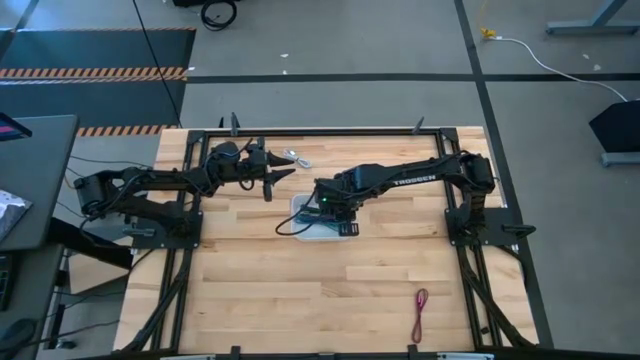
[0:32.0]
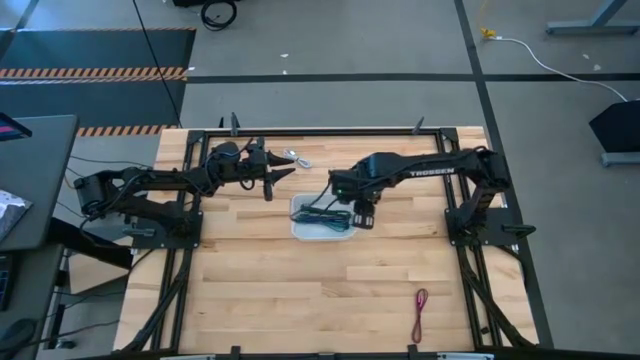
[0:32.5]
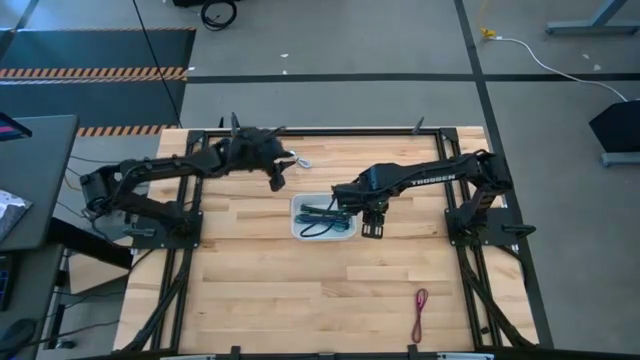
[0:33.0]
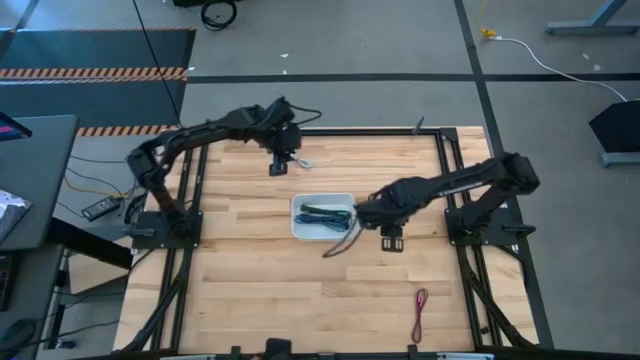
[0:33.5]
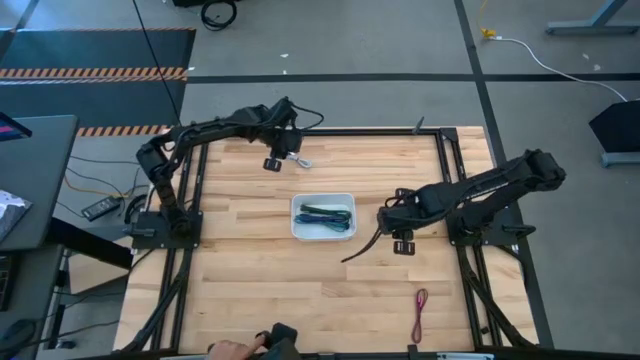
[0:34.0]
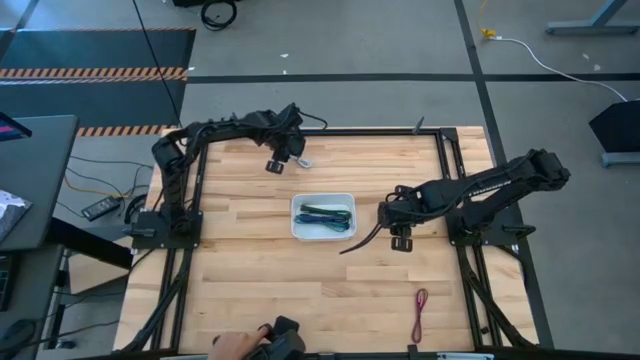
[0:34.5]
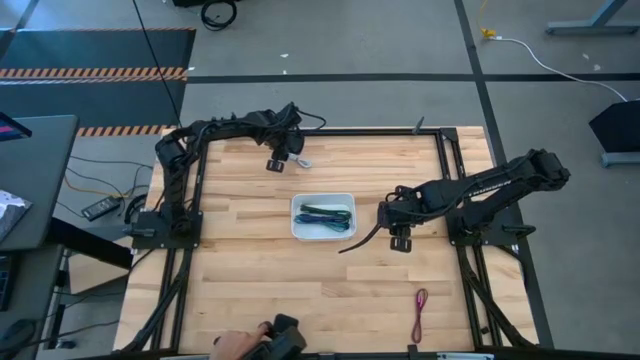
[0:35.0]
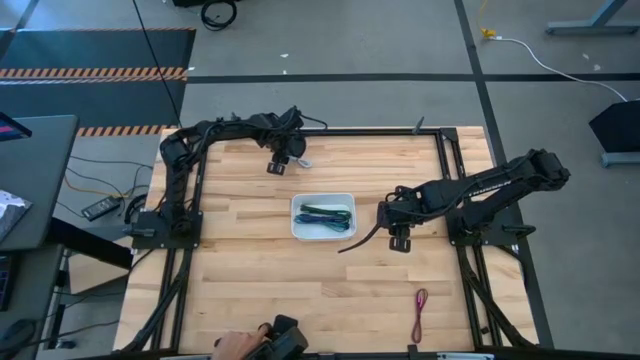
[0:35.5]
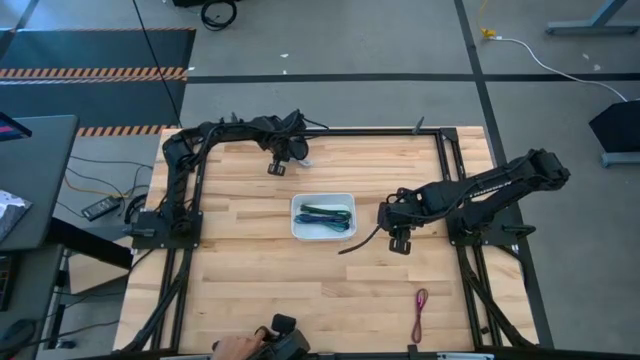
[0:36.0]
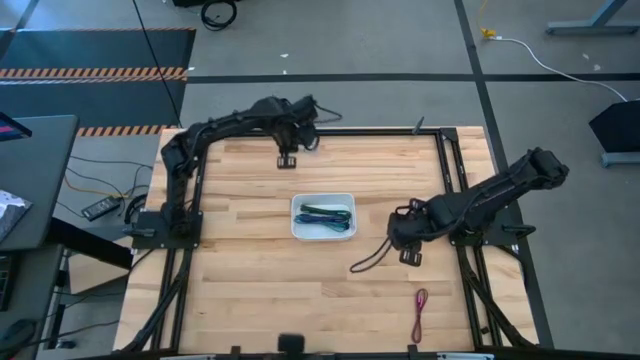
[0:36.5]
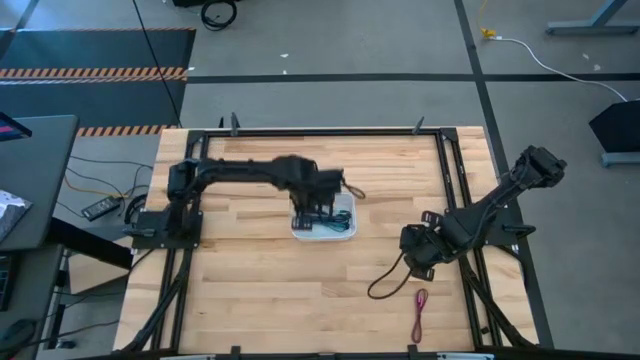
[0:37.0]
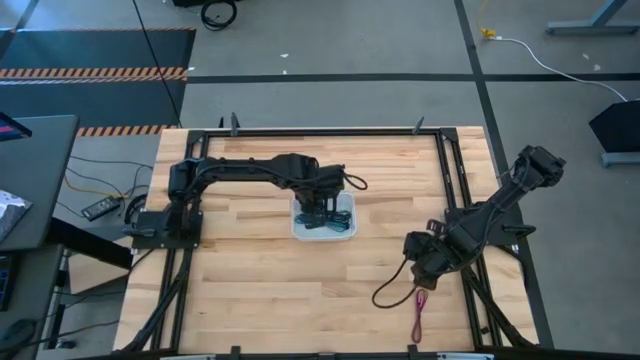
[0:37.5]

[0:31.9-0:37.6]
Task: Pick and place USB-C Cables
Put the white charger cable into the white bin

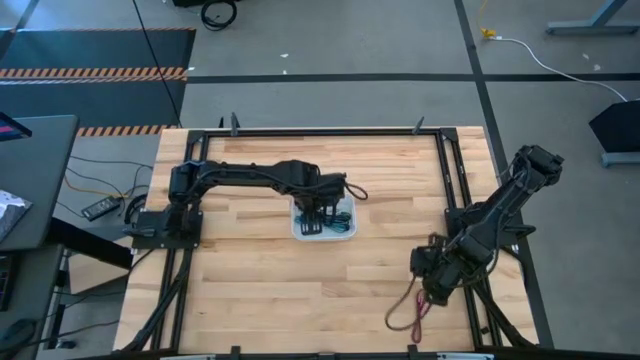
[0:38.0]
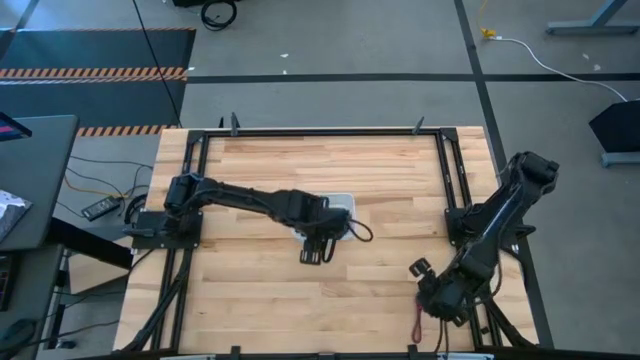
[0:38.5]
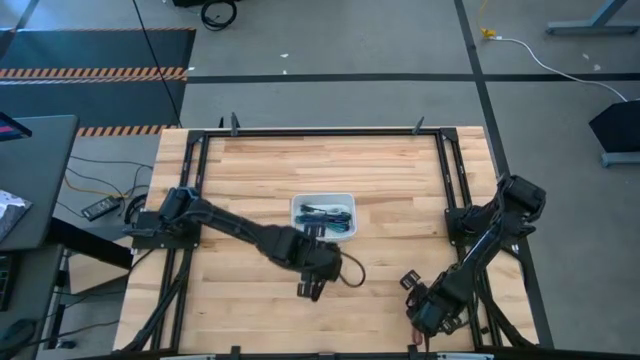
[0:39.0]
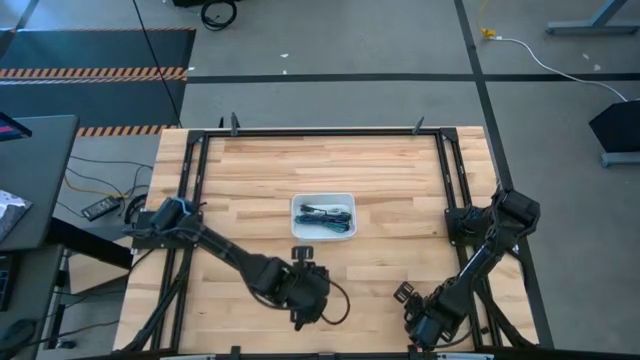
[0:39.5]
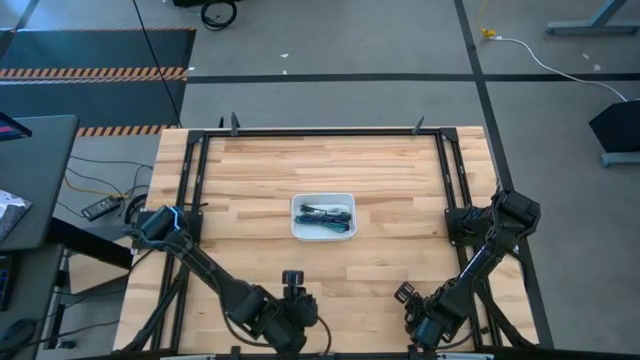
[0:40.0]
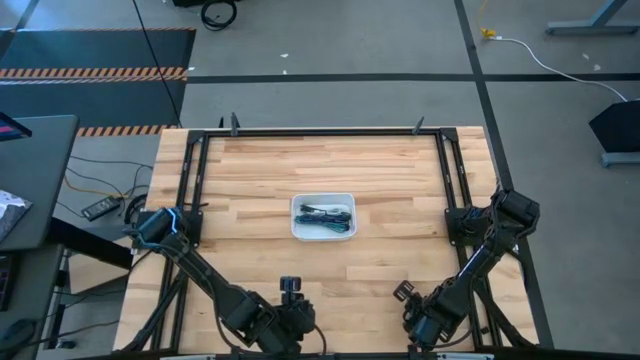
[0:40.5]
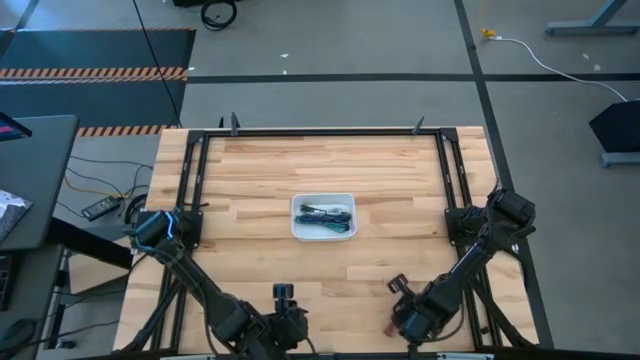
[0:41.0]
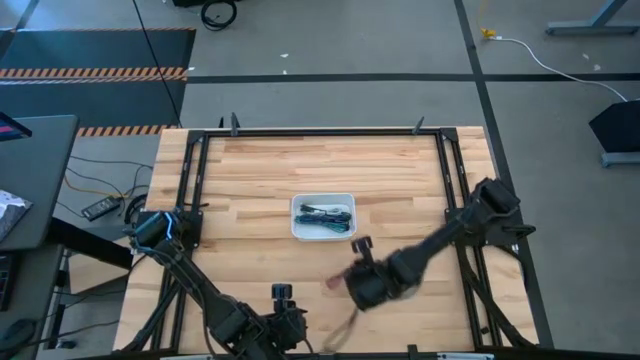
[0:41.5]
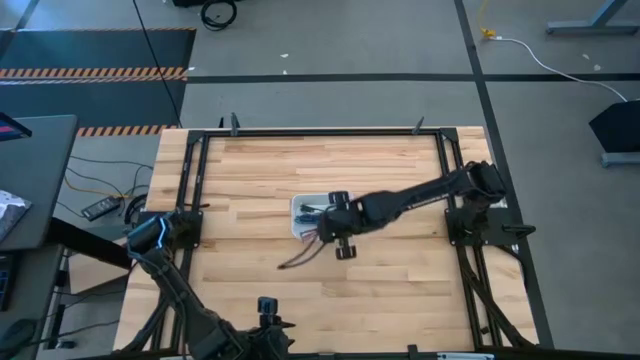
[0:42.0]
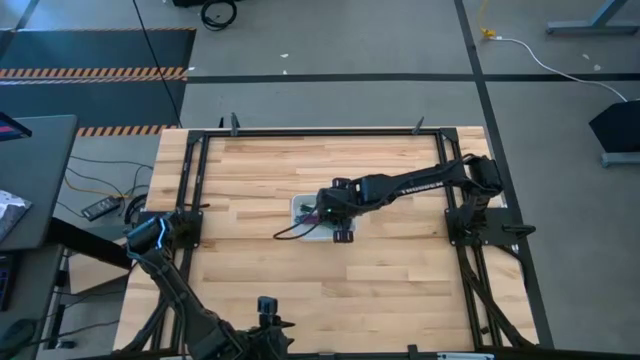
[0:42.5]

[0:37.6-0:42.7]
Put the pink charger cable into the white bin

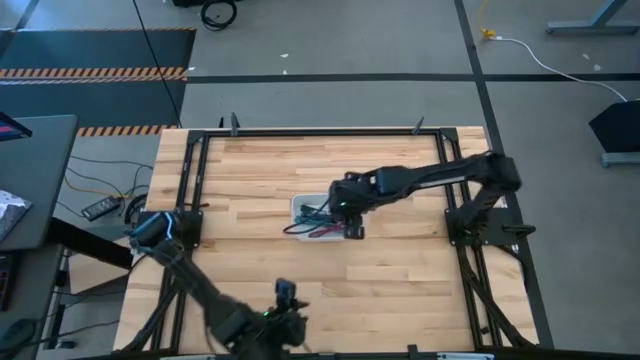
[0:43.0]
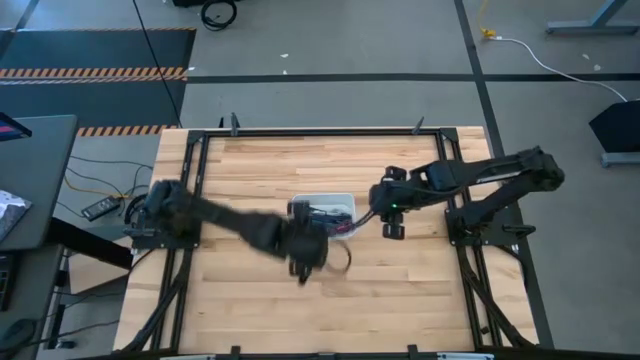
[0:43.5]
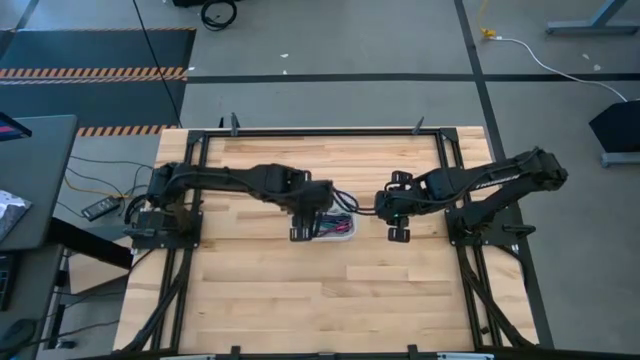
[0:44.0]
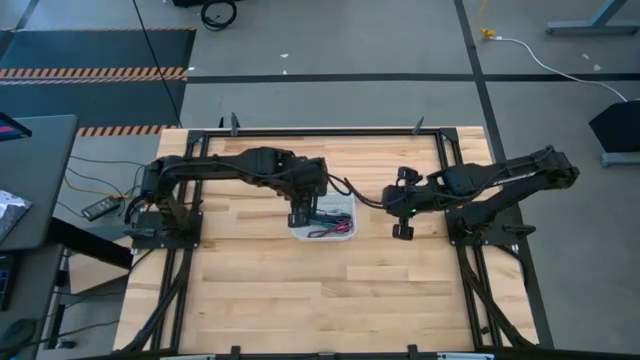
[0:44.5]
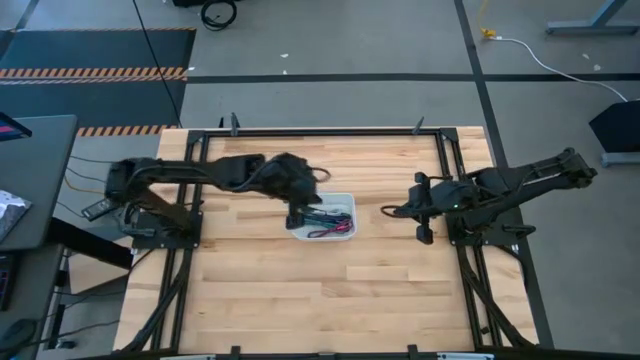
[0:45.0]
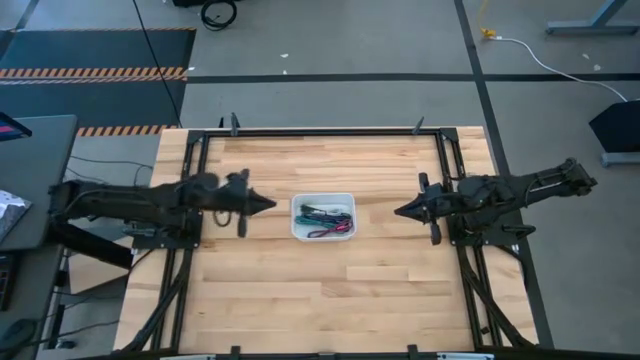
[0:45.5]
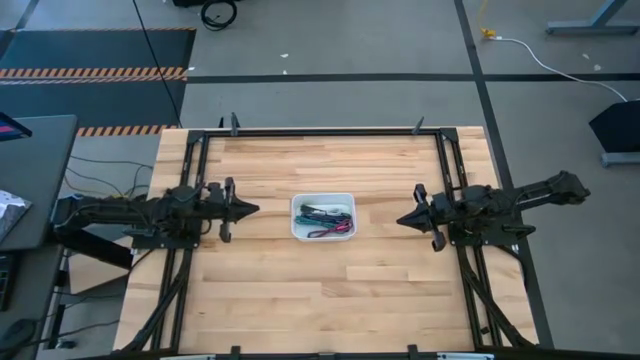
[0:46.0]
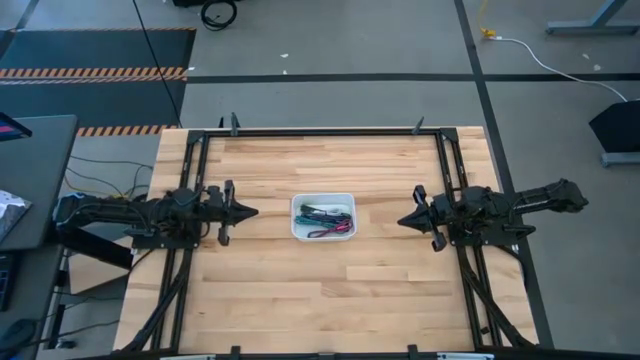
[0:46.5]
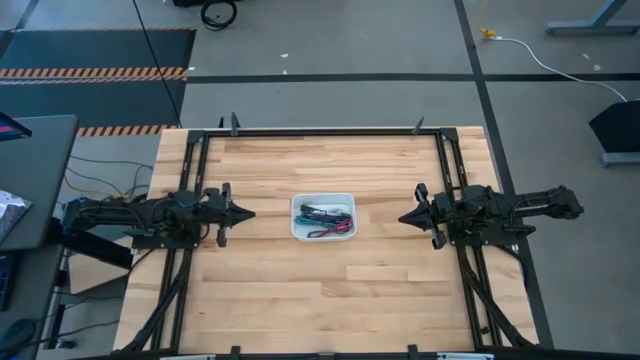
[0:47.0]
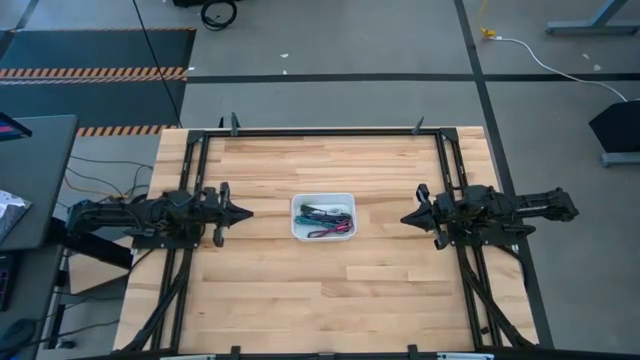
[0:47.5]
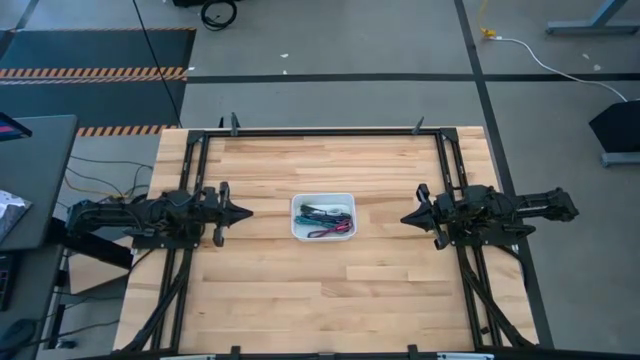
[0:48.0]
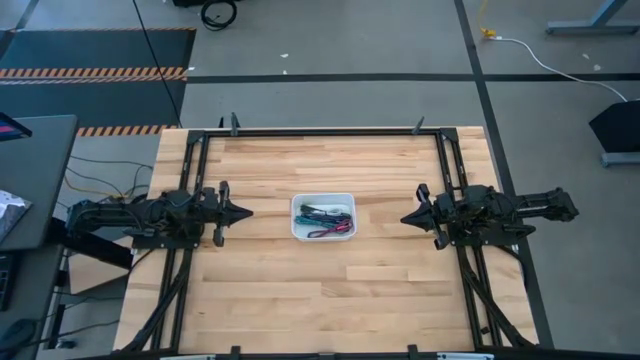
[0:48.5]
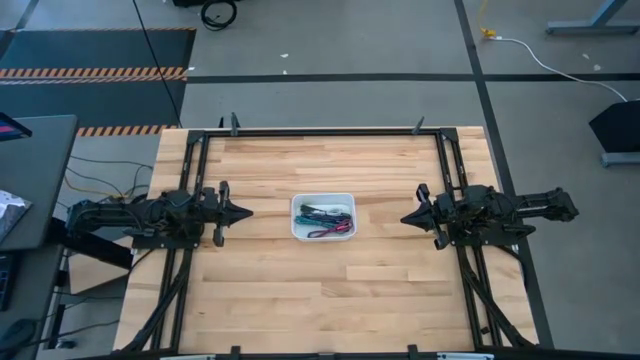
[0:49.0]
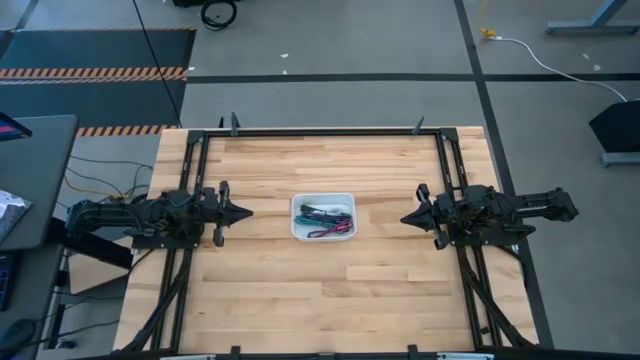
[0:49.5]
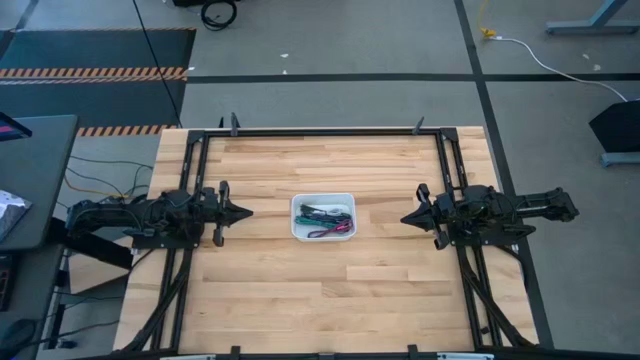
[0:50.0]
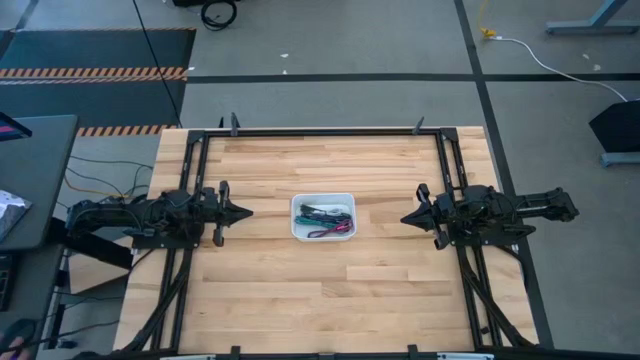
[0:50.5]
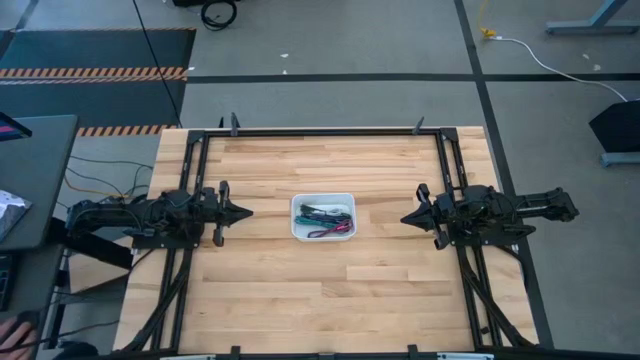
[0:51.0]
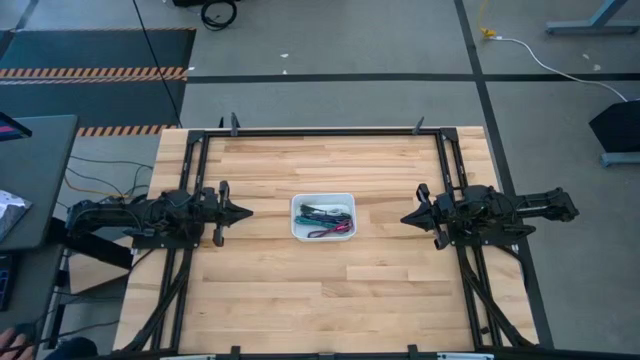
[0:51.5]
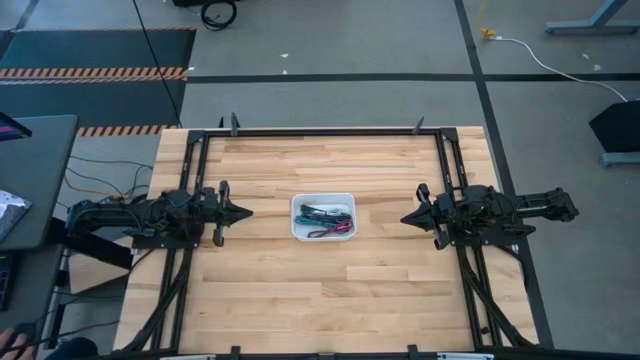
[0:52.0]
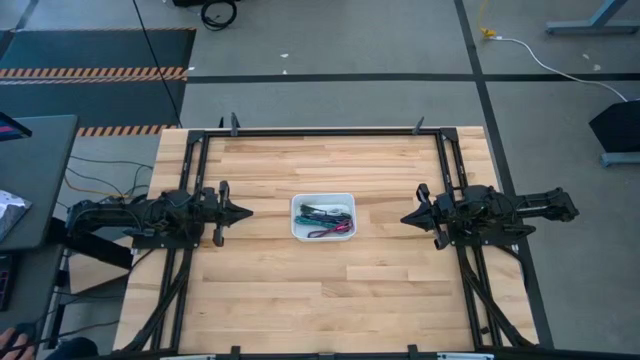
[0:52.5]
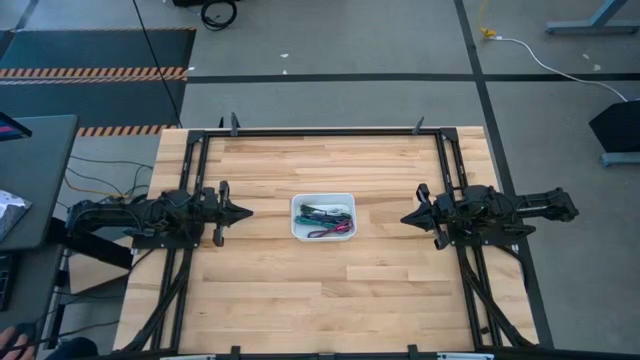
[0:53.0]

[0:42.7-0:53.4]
Return to Home Position
